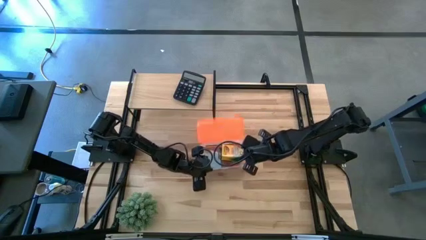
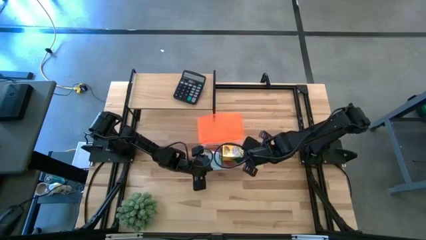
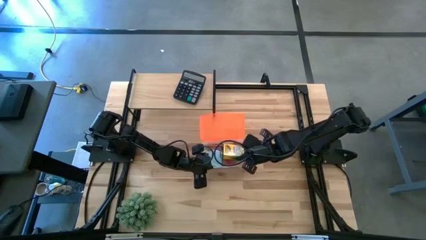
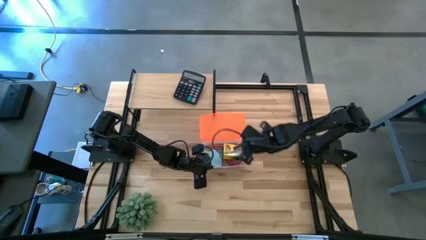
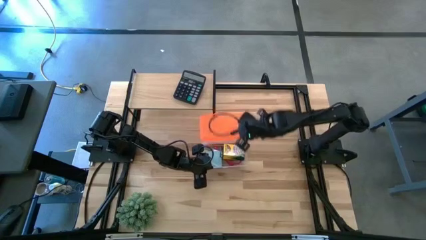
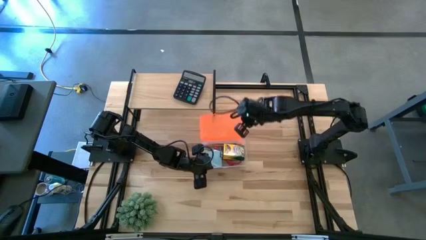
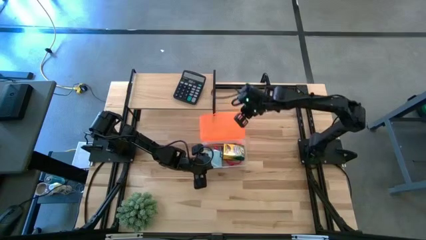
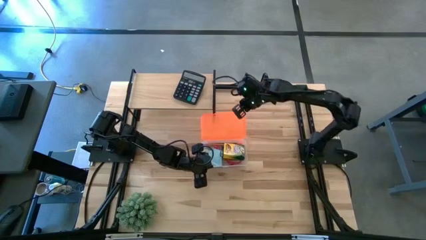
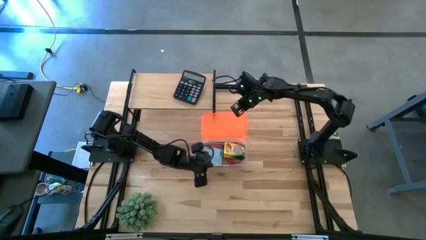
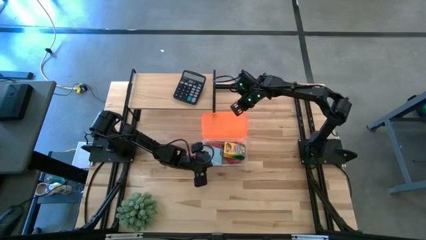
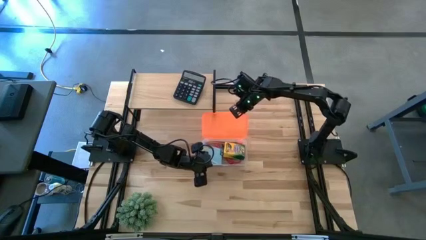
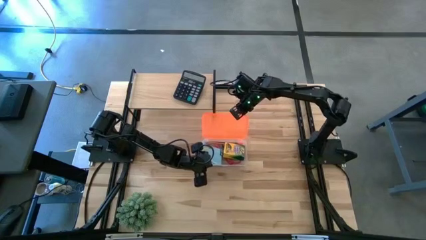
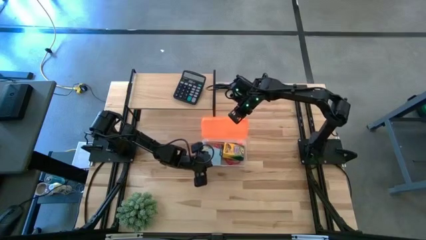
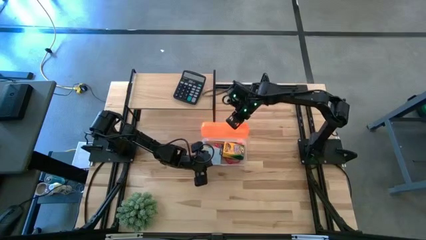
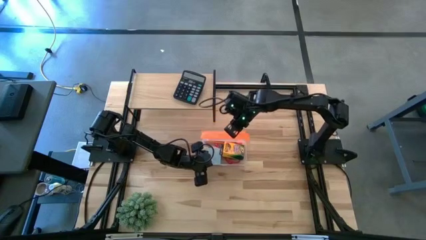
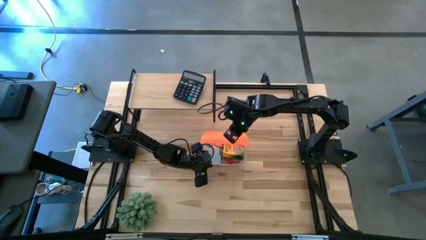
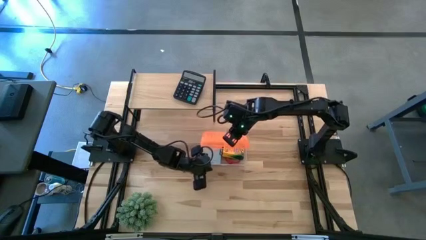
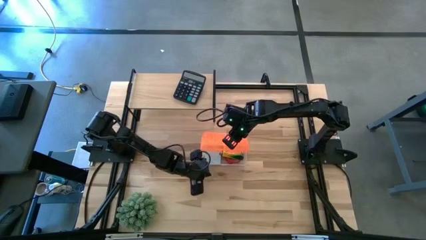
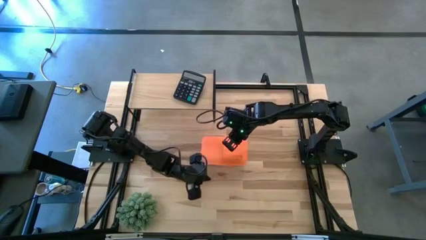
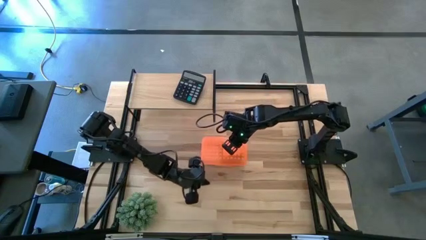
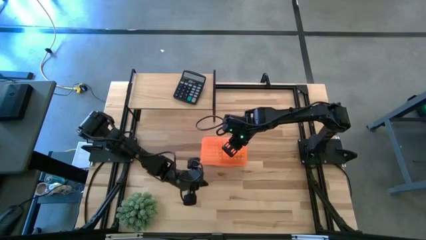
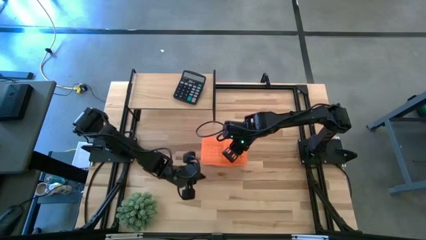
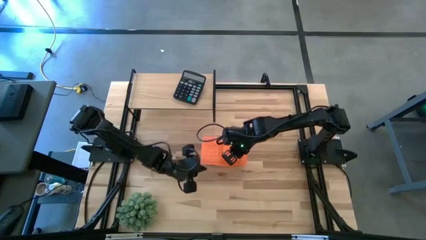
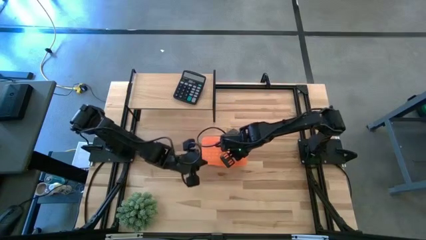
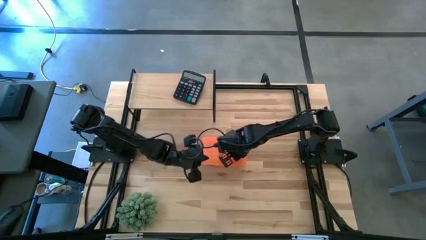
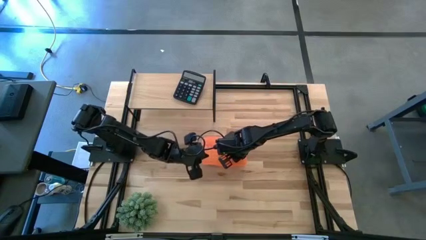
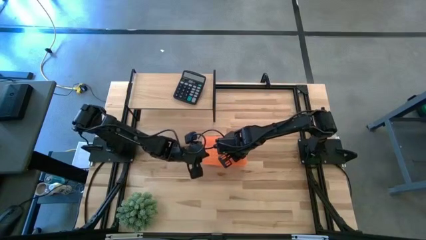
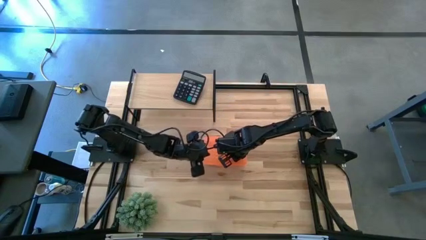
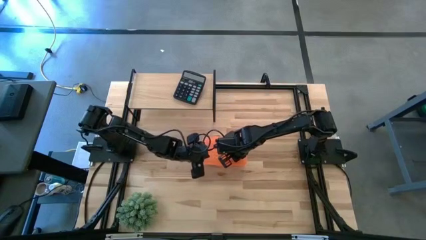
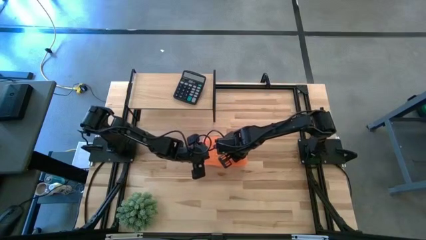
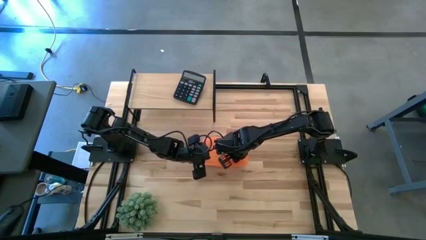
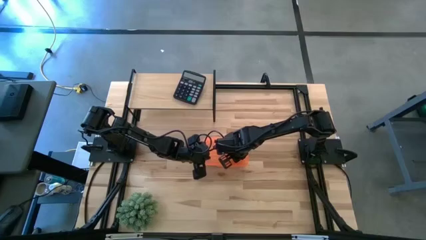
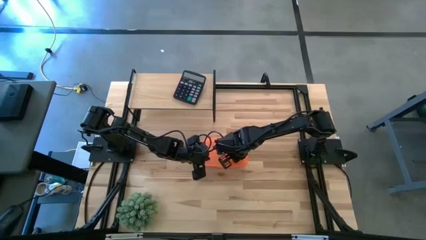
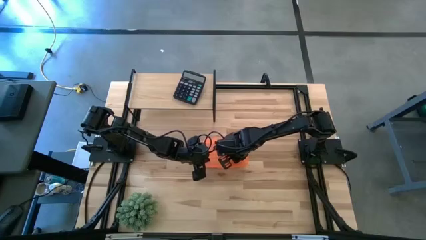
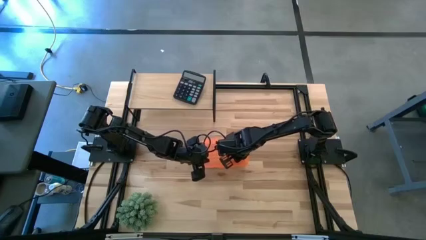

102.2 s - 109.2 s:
Task: Pack school essentials
Close the supply box

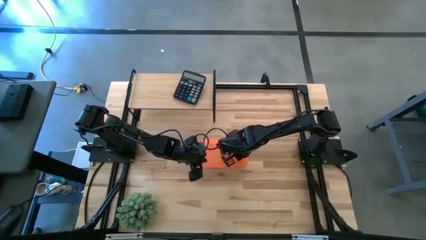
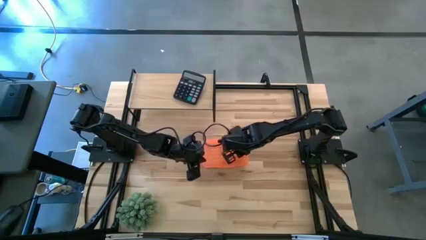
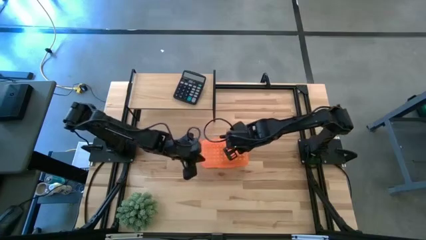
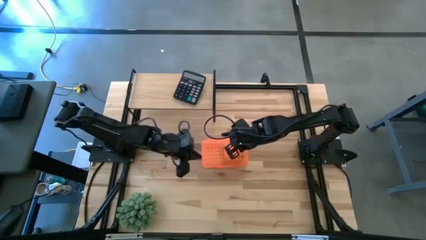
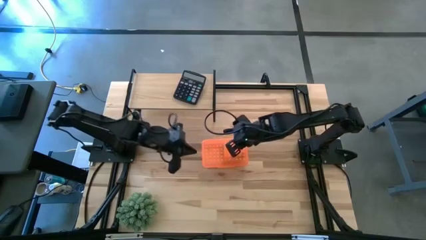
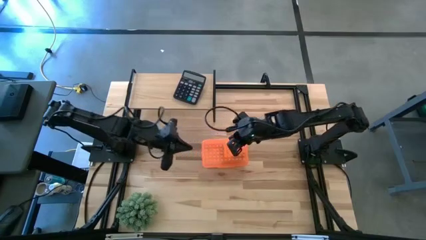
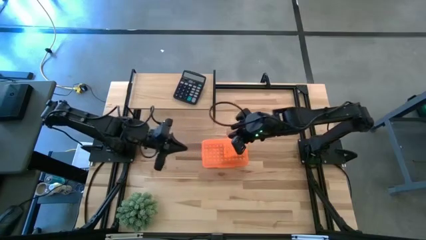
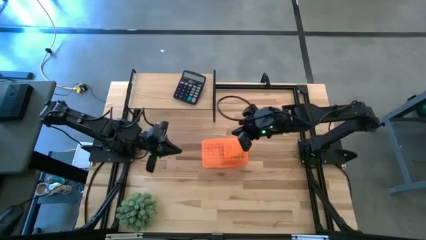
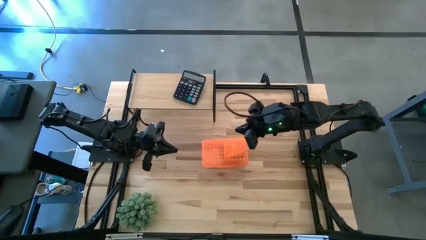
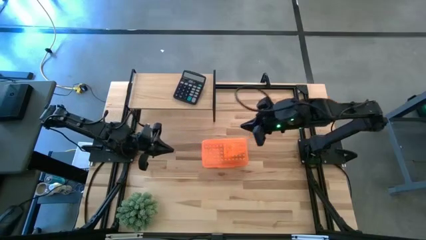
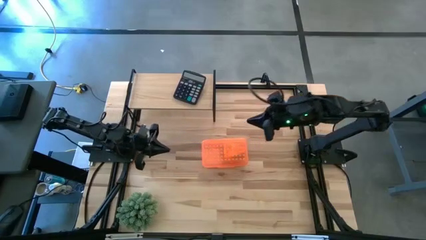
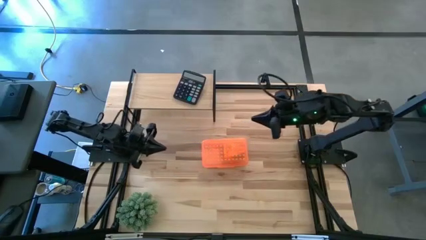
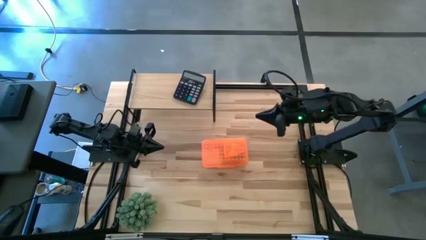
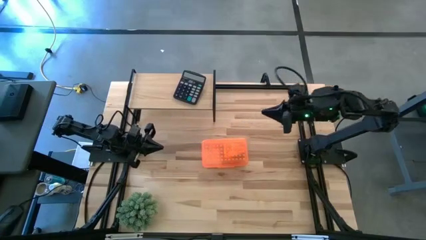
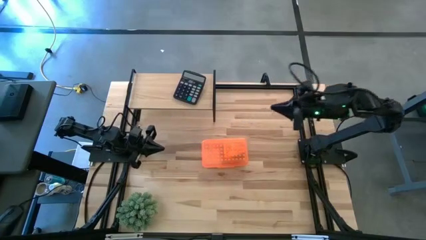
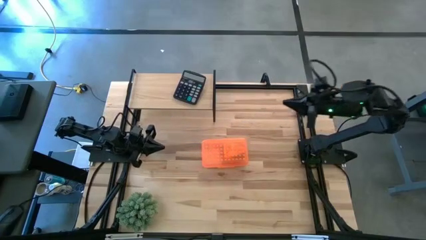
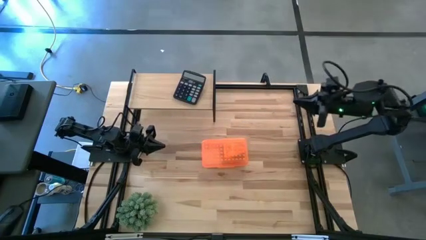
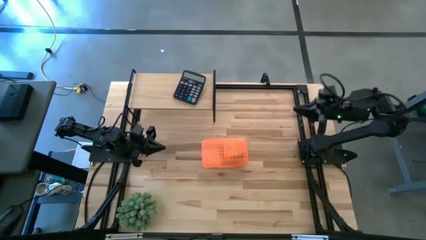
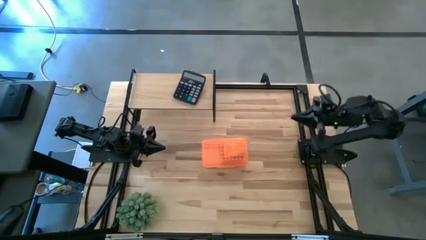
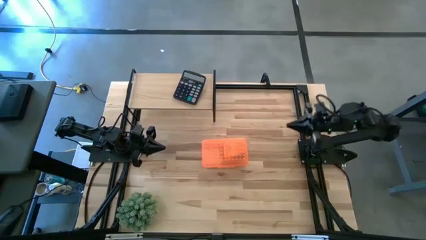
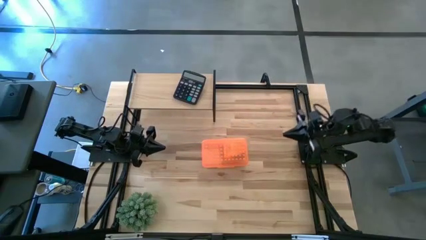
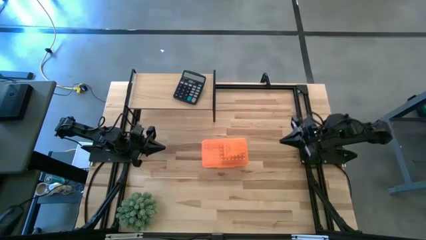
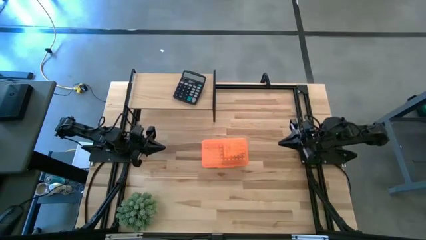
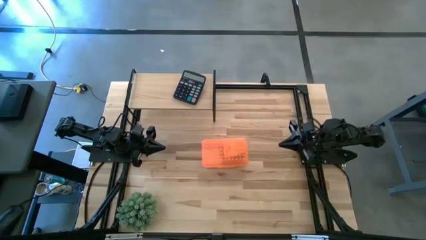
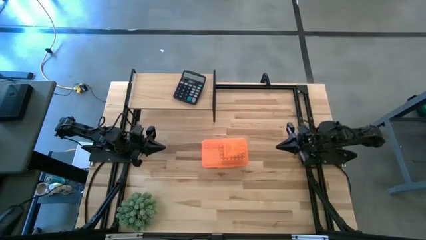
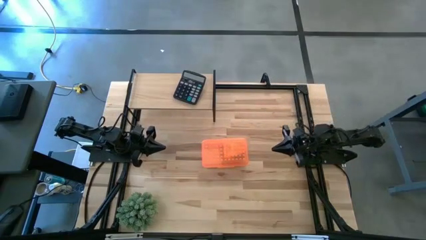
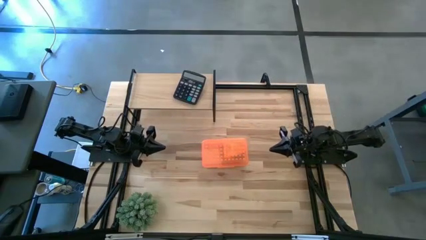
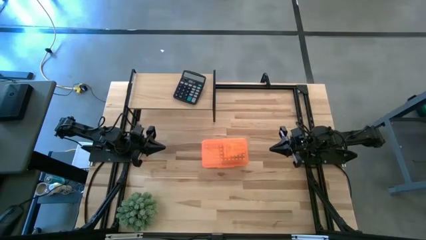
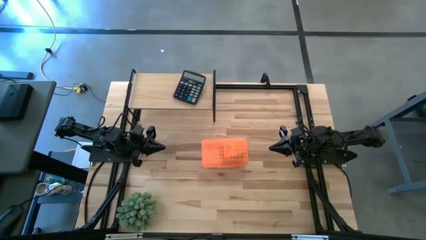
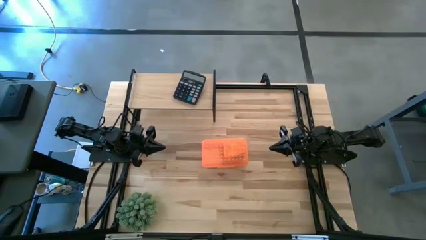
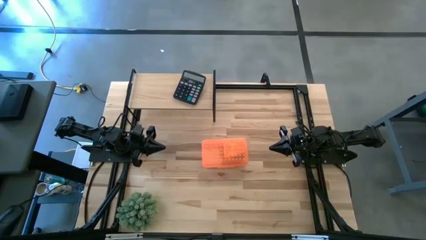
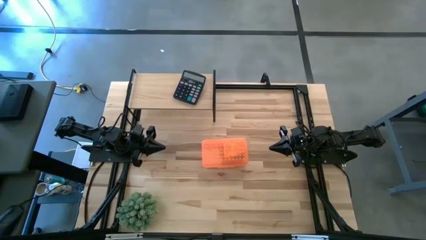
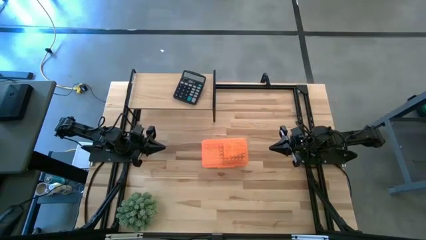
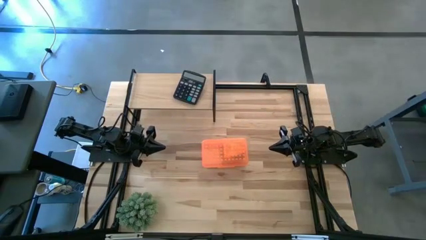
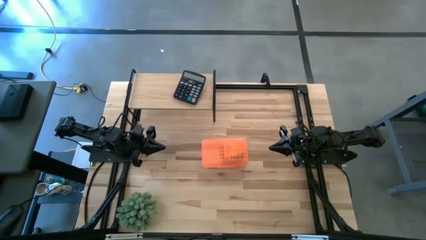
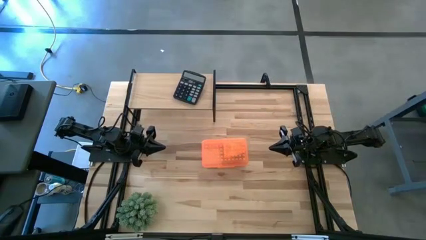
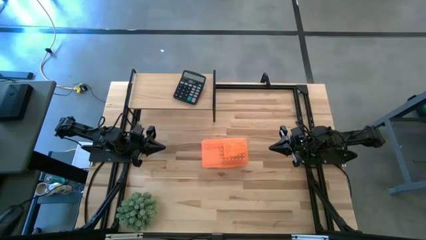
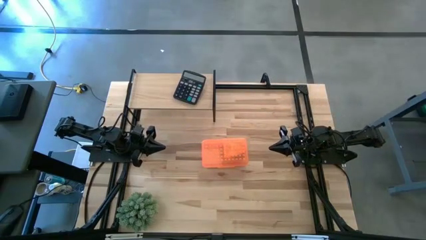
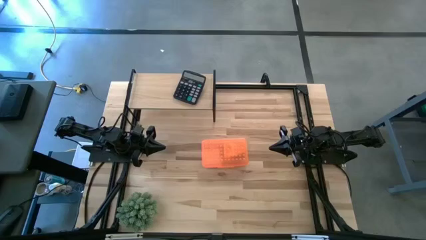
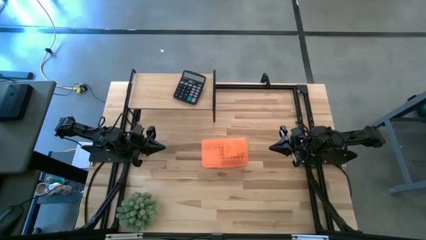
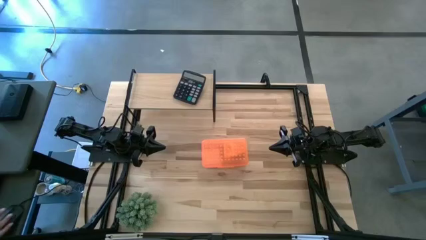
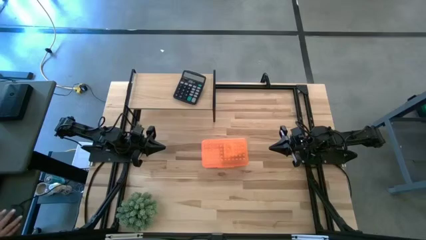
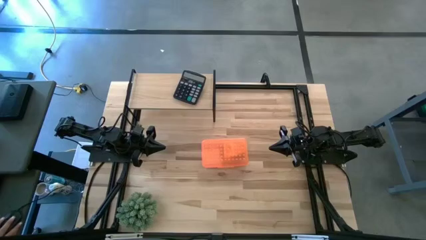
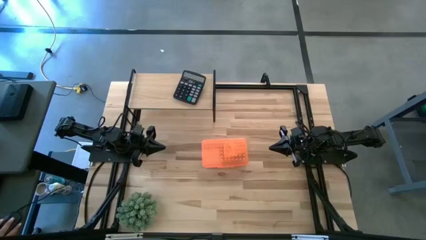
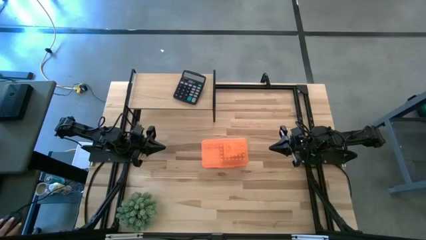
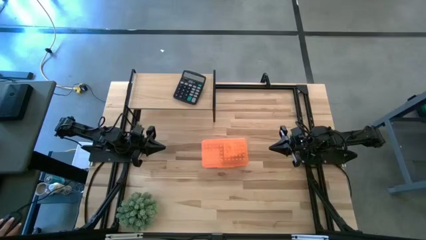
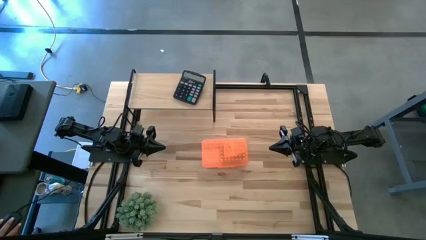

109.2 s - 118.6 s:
Return to Home Position
